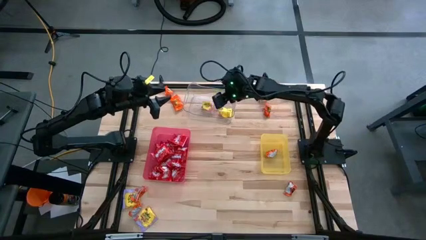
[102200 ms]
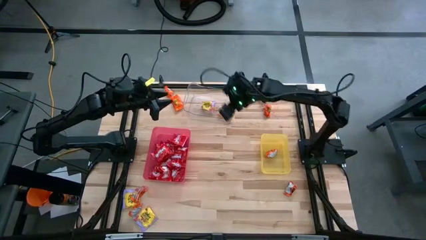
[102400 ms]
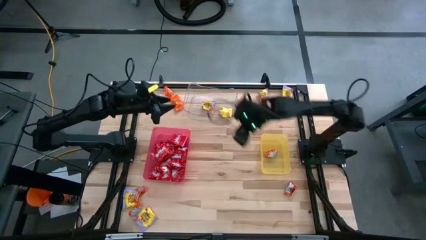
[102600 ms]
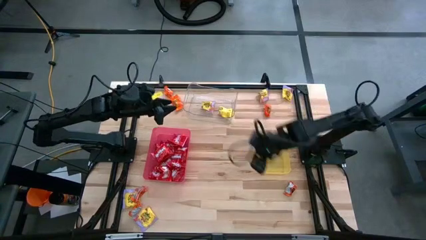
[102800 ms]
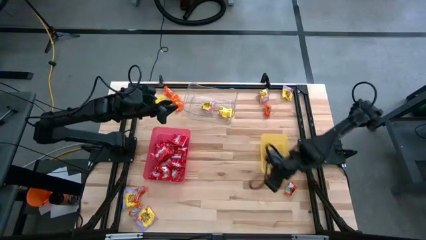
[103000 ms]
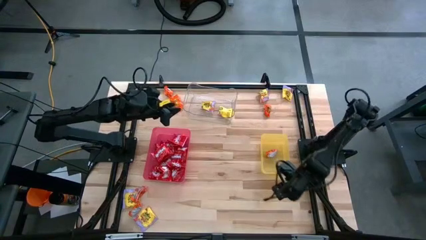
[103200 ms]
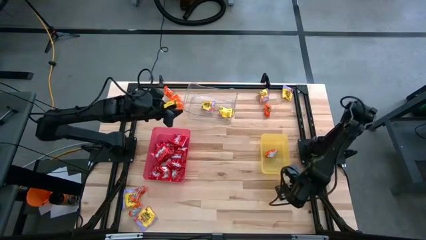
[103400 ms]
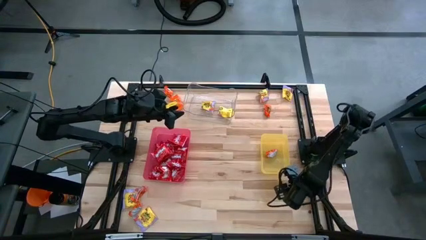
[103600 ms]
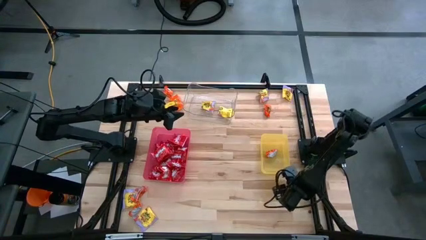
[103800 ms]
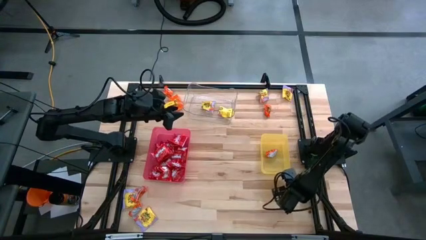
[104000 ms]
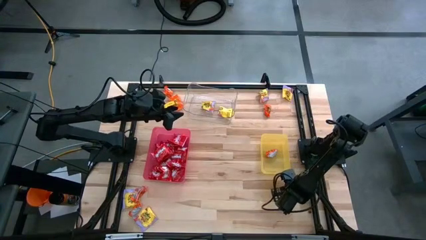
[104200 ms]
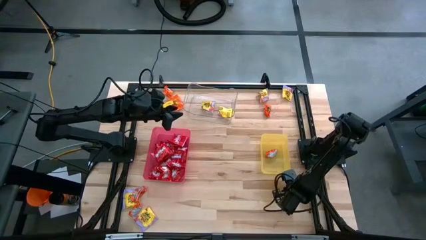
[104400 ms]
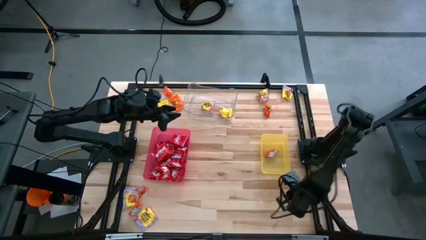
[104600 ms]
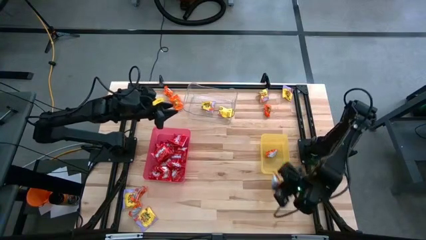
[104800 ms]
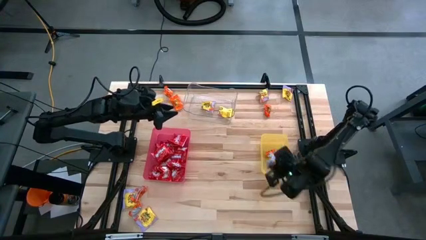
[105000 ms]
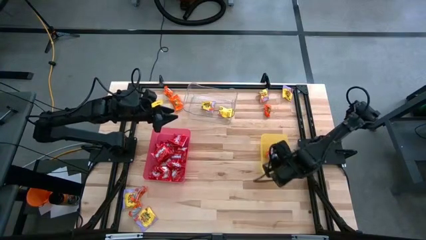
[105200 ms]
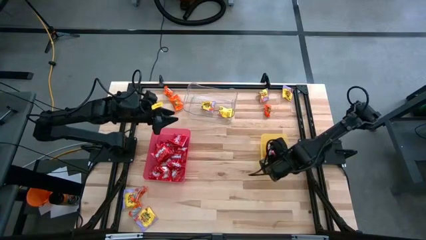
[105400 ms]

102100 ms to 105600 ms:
Task: Sort candy
Put the orange candy into the yellow bin

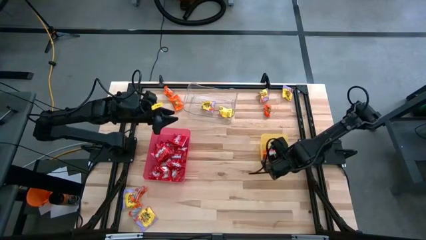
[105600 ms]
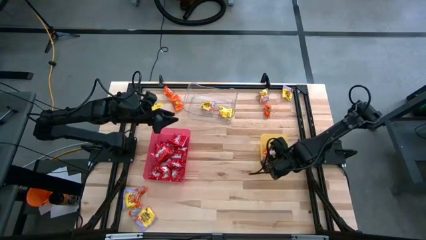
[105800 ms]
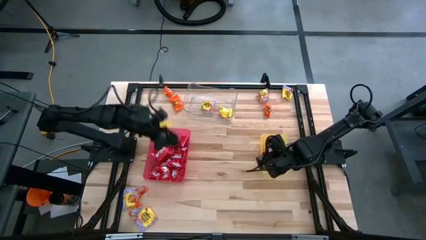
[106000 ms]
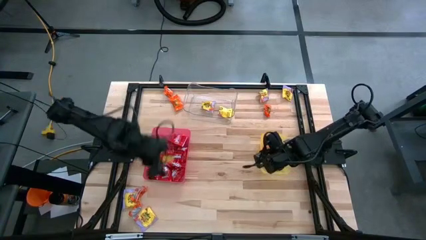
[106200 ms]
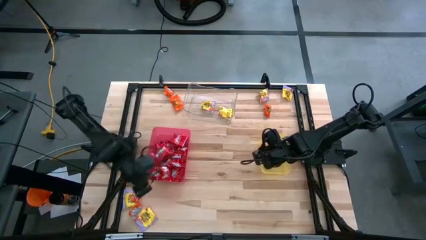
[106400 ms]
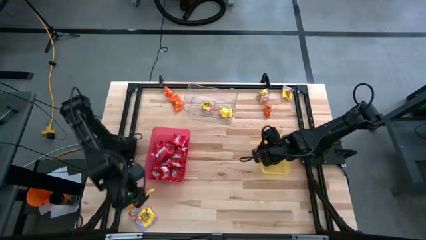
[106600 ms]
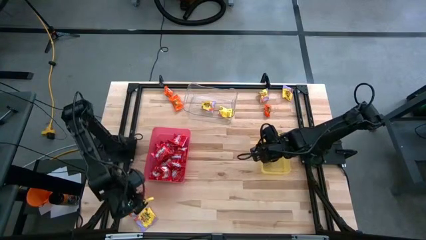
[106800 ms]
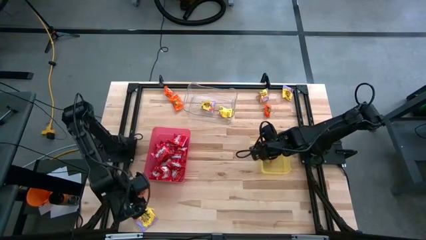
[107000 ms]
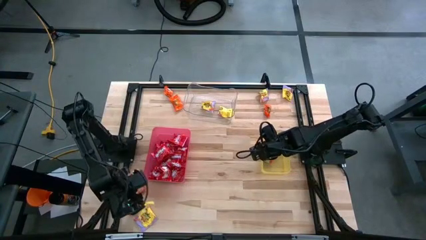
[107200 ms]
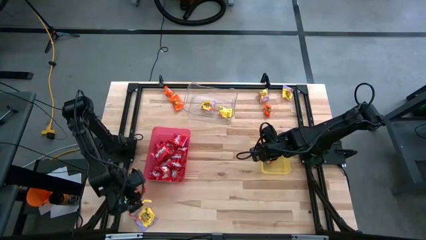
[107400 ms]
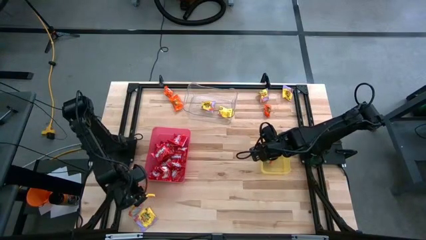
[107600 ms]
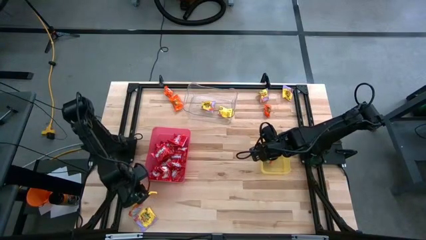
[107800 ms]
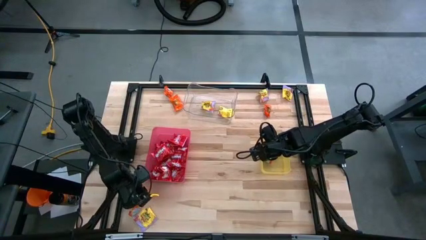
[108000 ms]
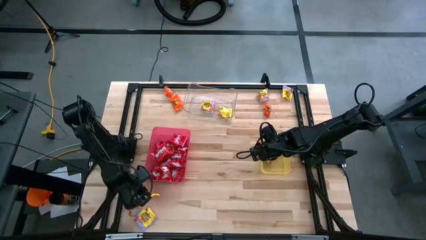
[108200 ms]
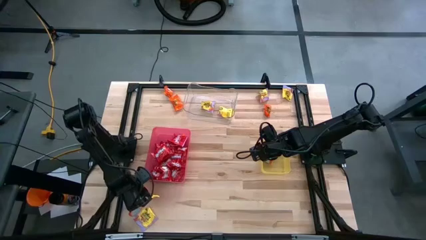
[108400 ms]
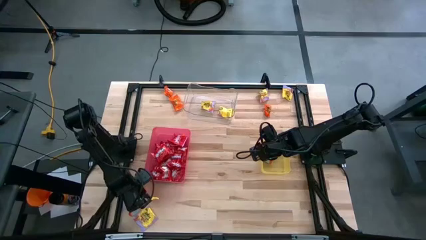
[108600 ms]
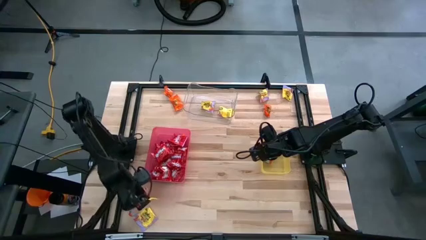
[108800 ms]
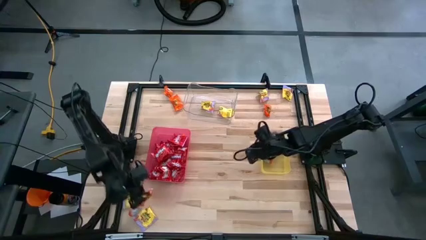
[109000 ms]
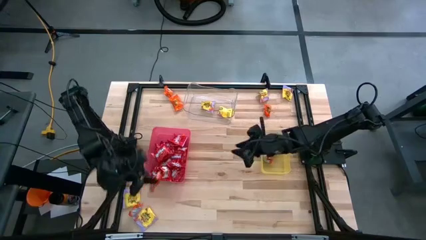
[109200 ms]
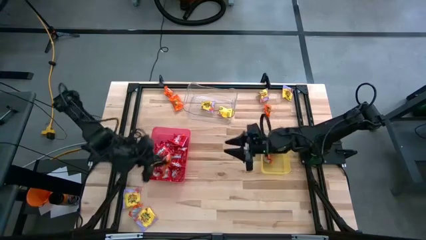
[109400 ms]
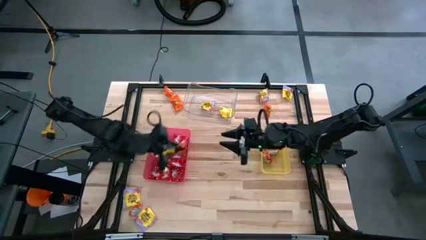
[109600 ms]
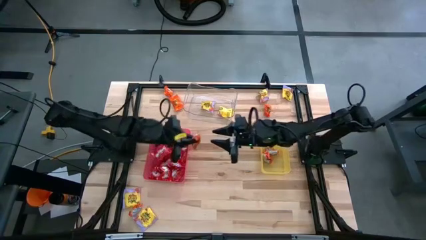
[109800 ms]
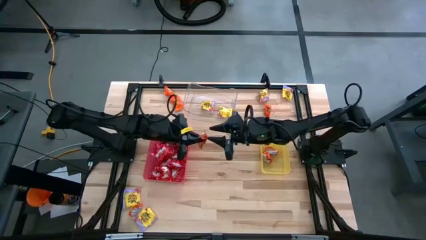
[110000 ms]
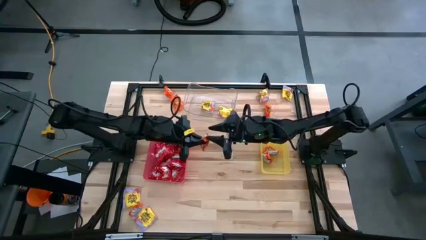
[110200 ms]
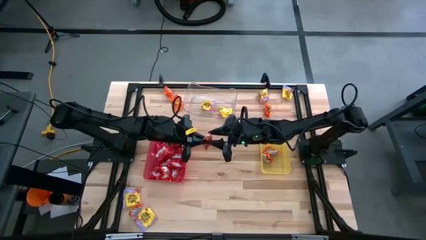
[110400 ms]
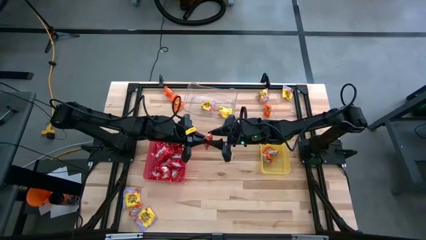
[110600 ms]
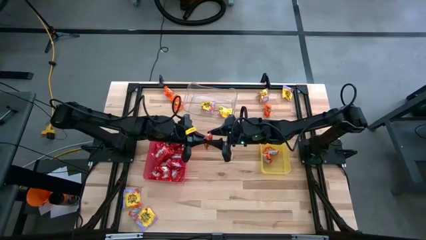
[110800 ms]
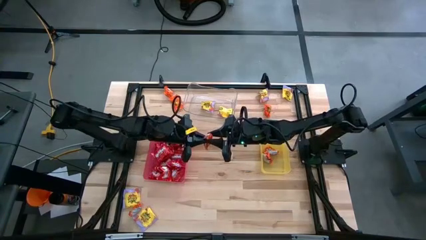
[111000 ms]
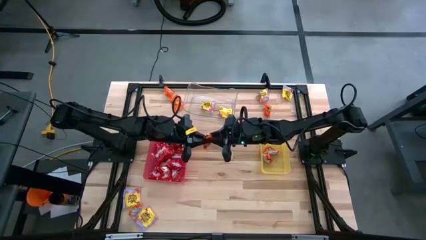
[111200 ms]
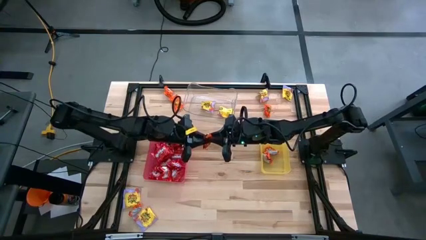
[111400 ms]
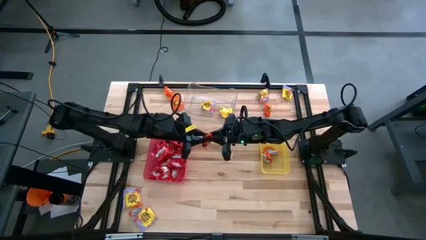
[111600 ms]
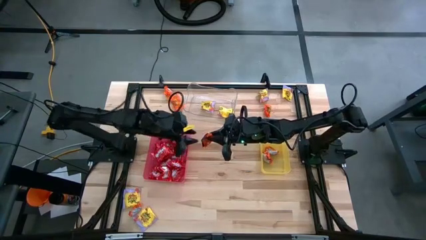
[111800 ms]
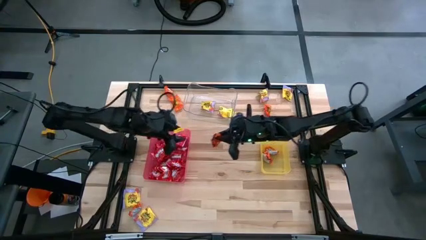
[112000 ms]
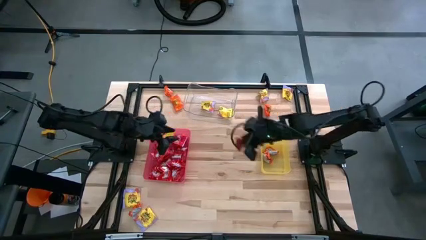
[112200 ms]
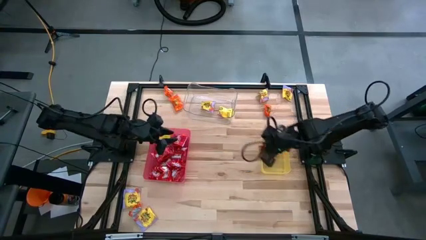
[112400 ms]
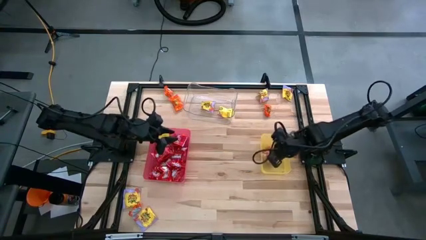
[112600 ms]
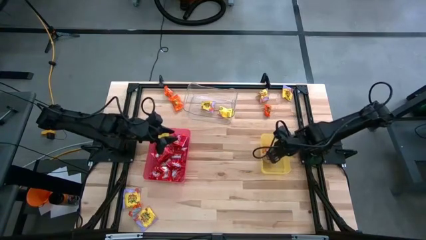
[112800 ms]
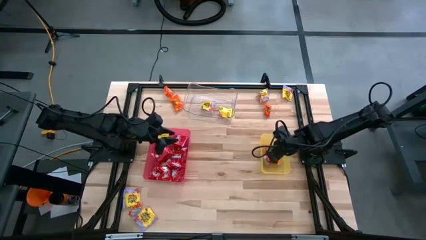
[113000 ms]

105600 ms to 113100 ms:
Put the orange candy into the yellow bin

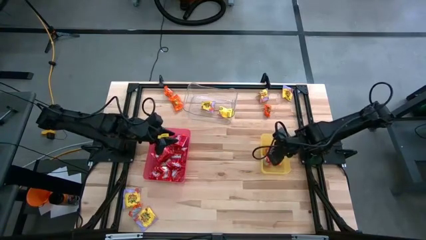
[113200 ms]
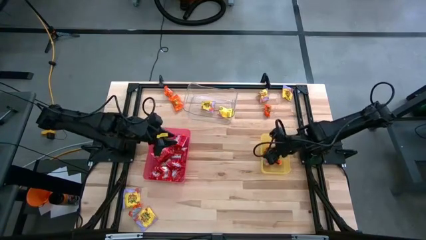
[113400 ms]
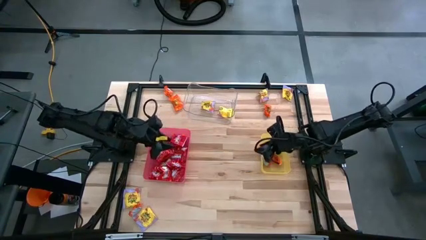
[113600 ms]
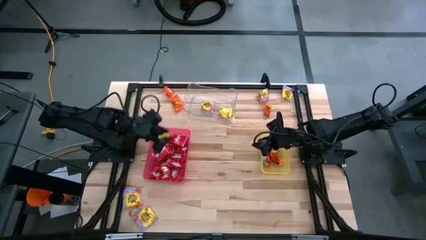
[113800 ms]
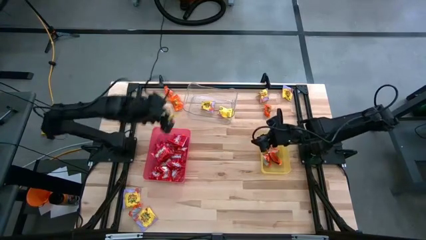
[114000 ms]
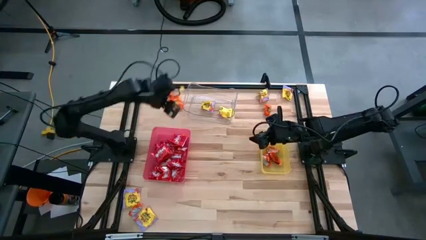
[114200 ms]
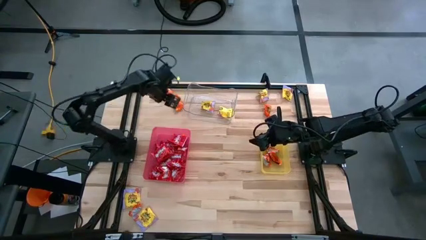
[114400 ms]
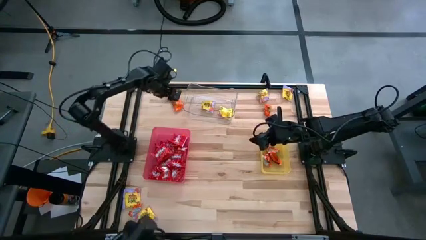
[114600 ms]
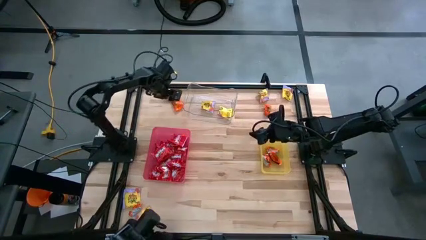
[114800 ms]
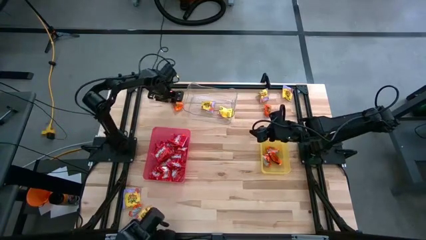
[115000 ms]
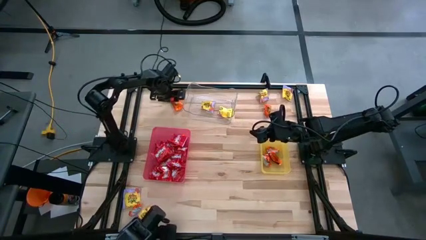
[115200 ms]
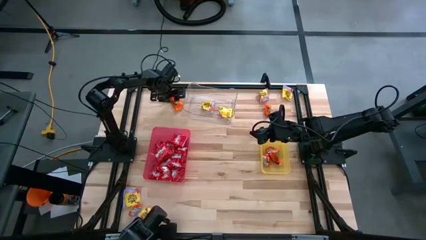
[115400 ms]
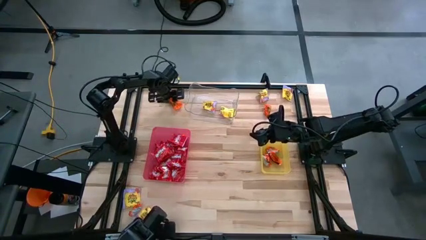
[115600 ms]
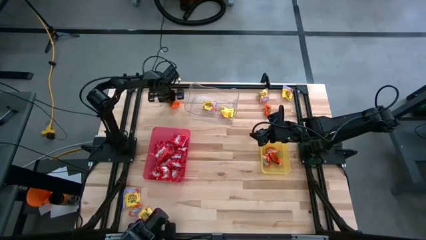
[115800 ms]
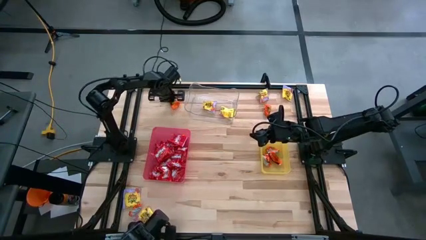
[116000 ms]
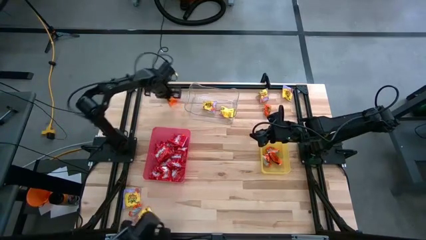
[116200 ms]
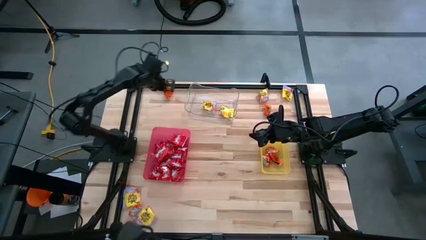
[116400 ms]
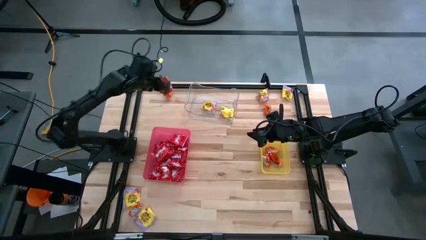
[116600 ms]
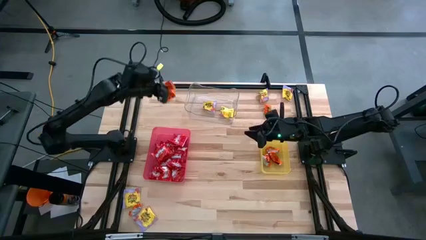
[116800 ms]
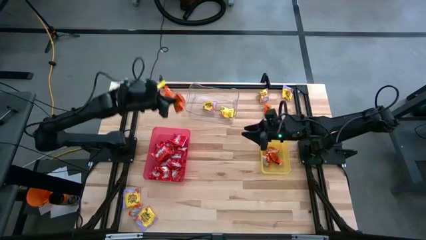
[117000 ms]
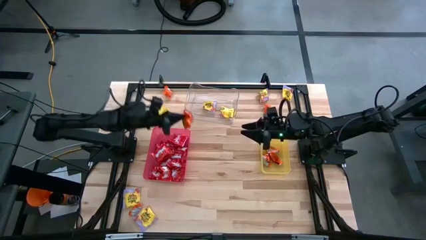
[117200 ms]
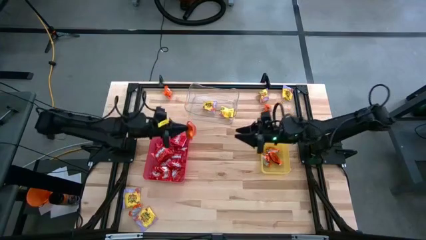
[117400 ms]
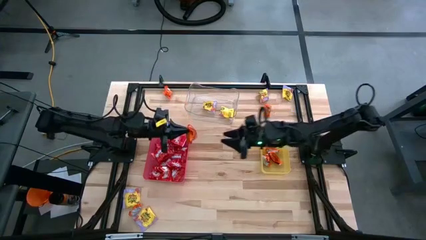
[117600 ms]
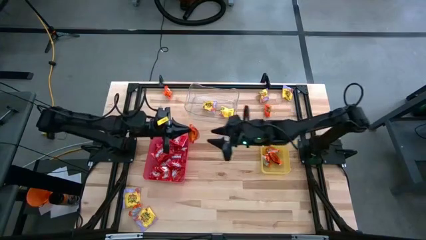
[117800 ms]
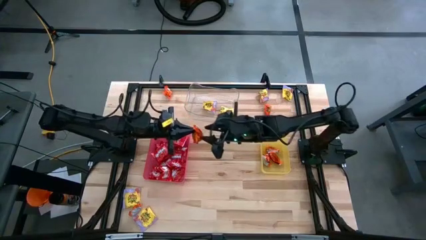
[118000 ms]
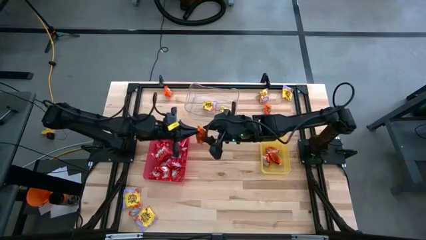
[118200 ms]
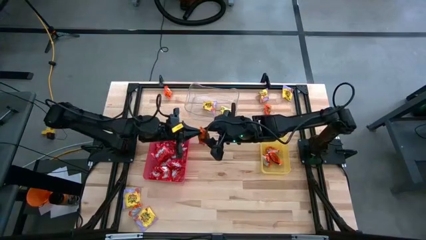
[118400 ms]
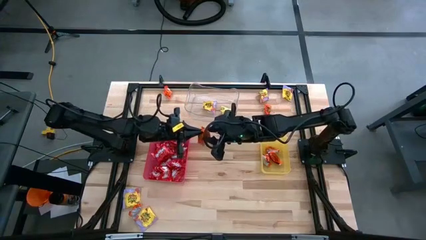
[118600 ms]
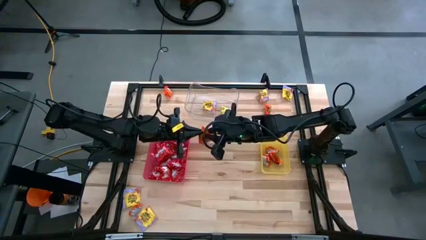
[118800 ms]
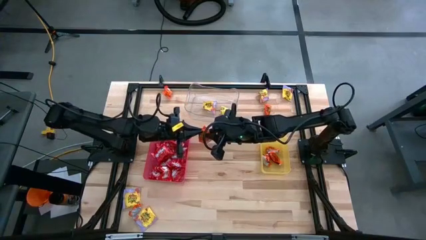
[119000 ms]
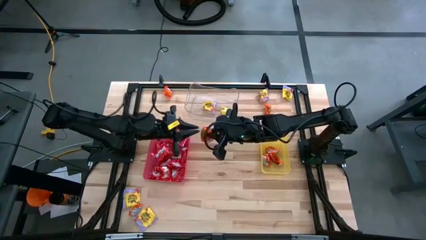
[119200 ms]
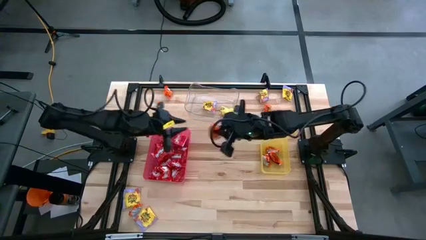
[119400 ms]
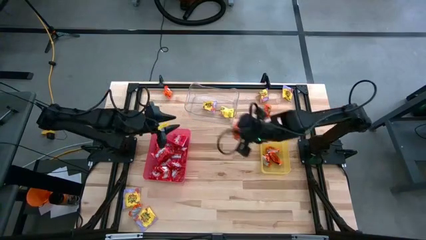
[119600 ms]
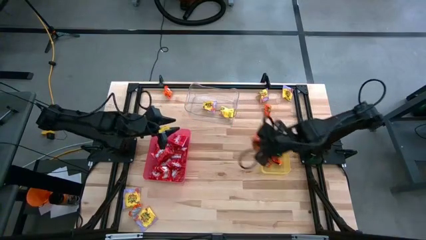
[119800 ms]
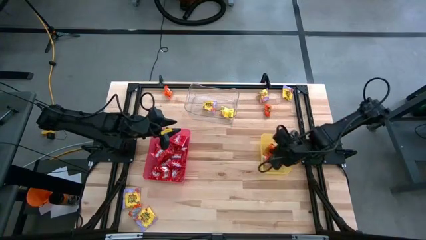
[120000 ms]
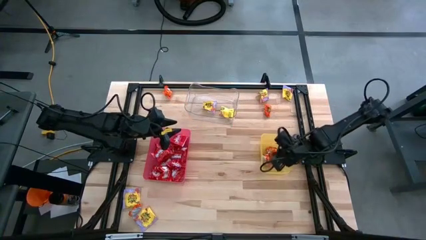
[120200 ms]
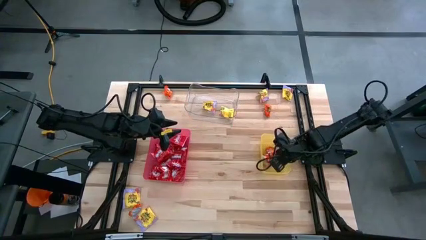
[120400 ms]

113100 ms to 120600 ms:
Put the orange candy into the yellow bin
